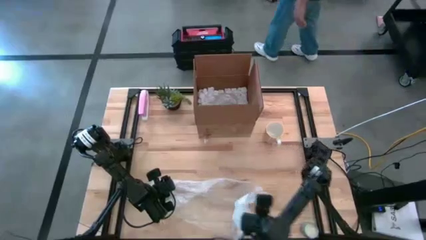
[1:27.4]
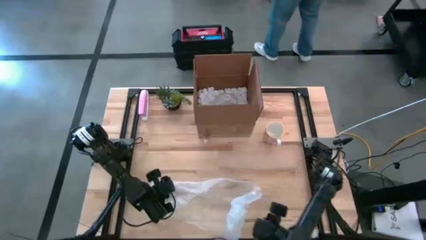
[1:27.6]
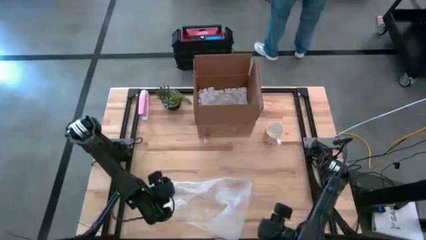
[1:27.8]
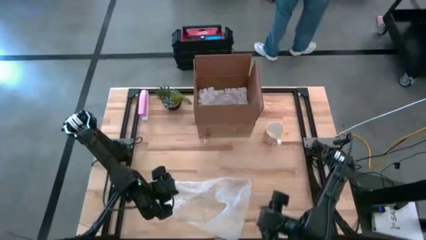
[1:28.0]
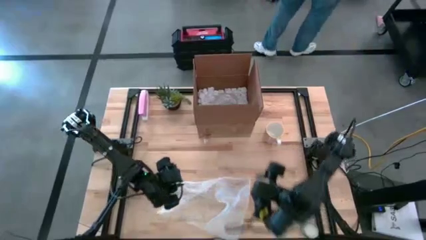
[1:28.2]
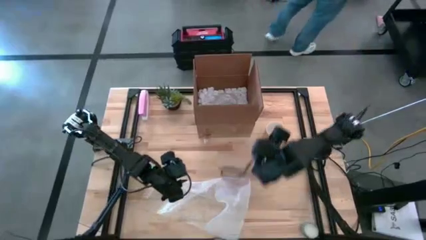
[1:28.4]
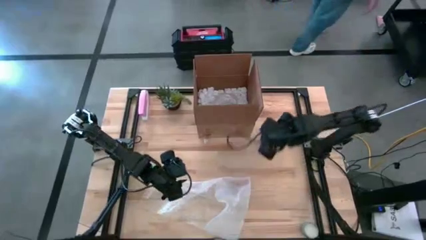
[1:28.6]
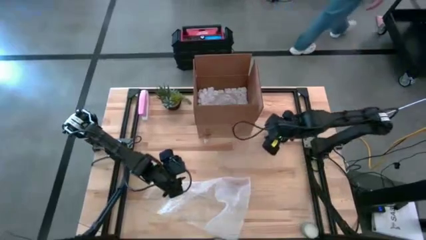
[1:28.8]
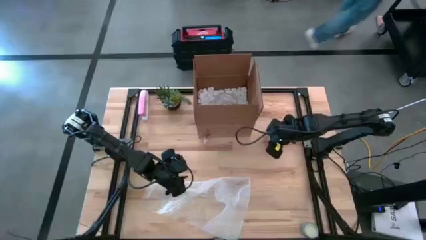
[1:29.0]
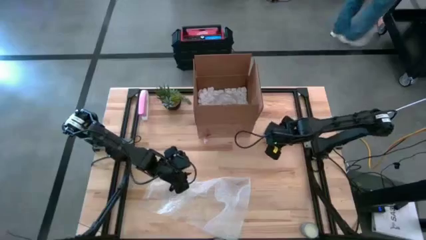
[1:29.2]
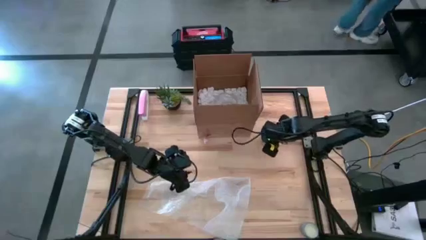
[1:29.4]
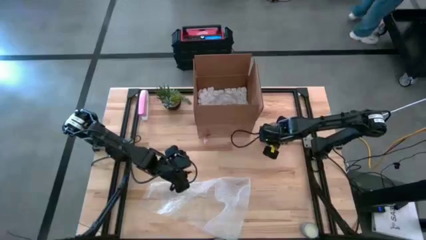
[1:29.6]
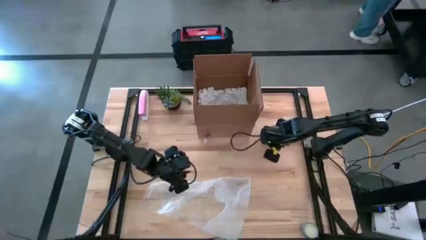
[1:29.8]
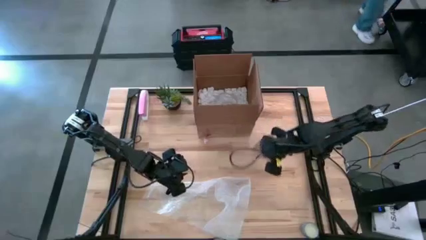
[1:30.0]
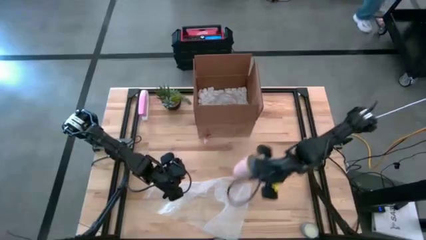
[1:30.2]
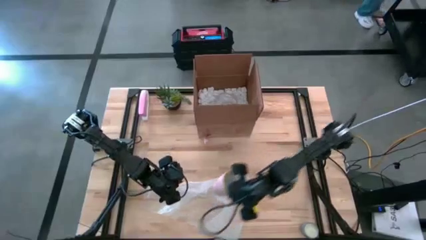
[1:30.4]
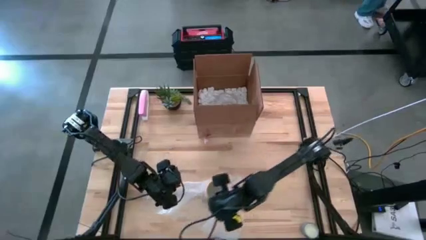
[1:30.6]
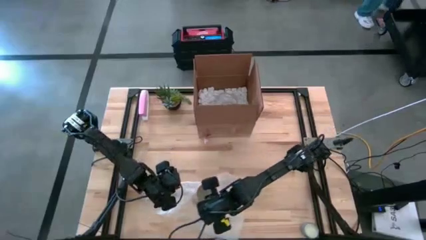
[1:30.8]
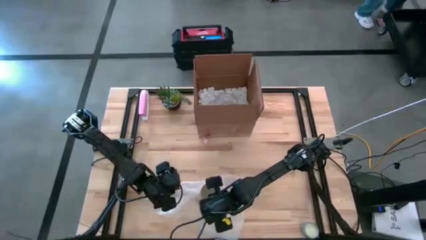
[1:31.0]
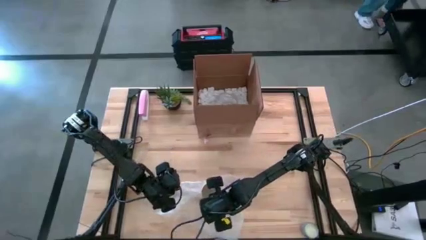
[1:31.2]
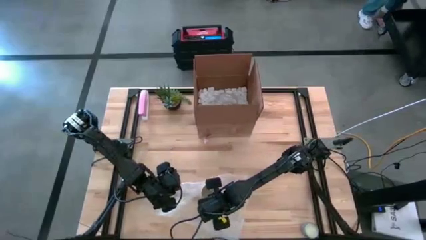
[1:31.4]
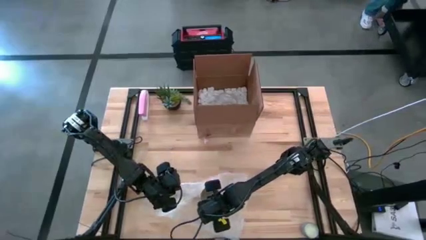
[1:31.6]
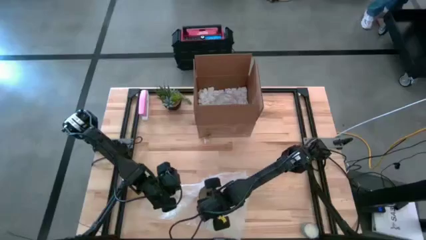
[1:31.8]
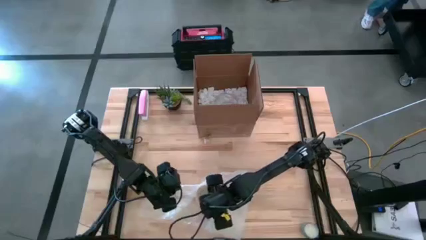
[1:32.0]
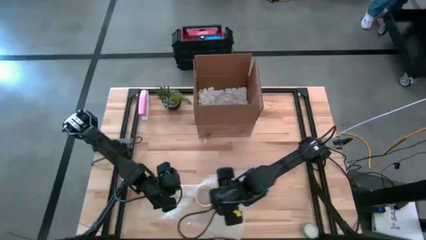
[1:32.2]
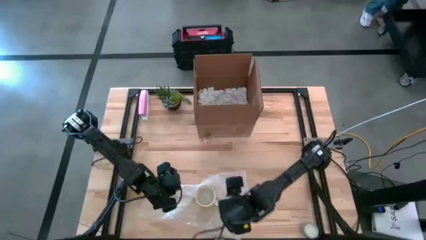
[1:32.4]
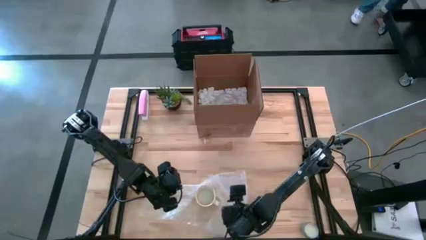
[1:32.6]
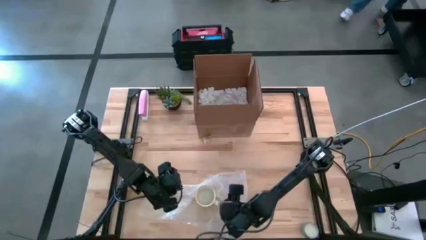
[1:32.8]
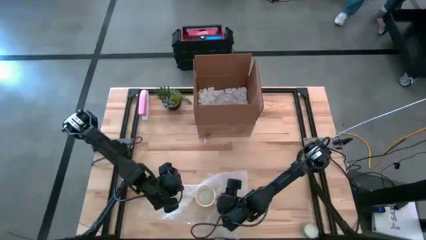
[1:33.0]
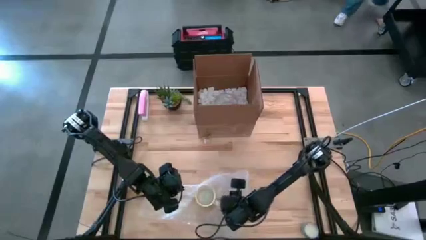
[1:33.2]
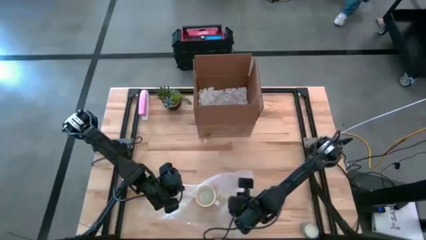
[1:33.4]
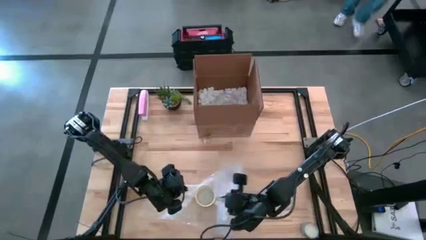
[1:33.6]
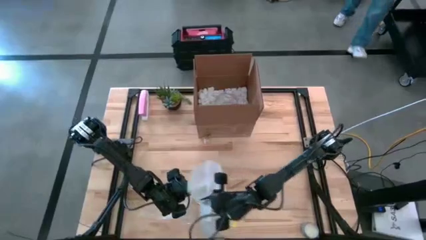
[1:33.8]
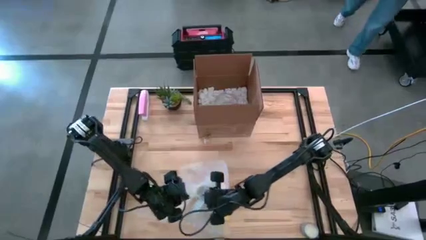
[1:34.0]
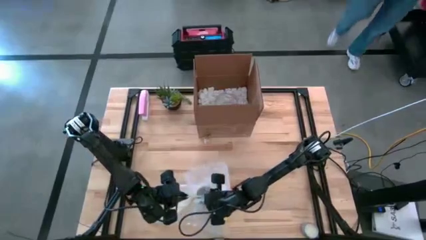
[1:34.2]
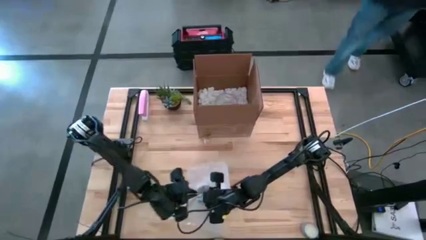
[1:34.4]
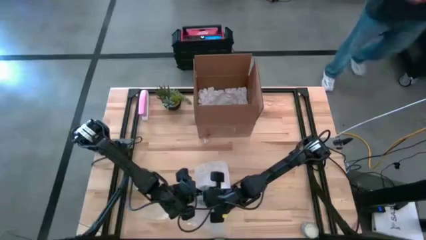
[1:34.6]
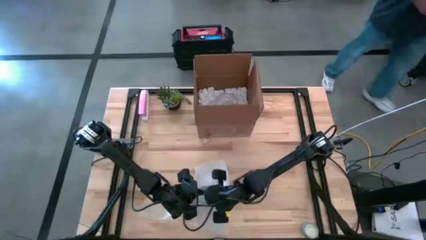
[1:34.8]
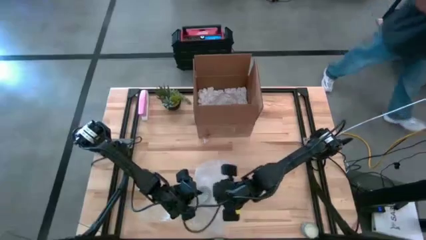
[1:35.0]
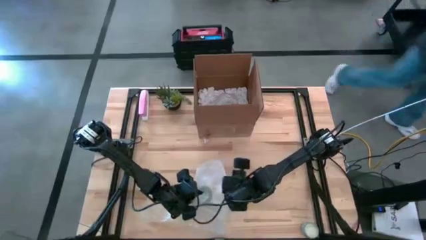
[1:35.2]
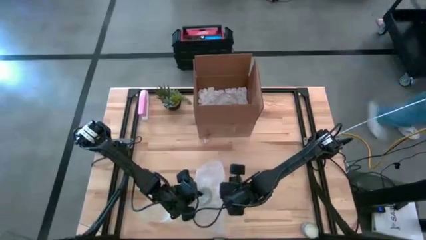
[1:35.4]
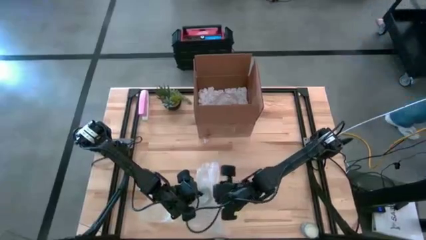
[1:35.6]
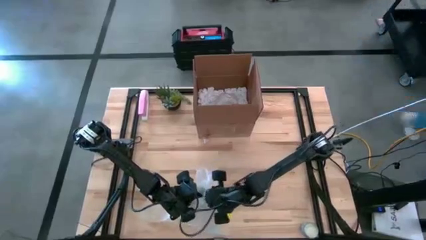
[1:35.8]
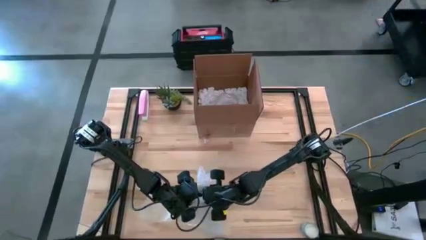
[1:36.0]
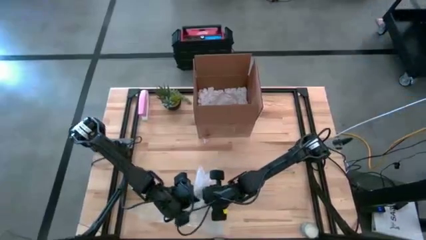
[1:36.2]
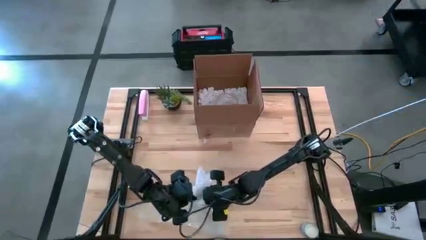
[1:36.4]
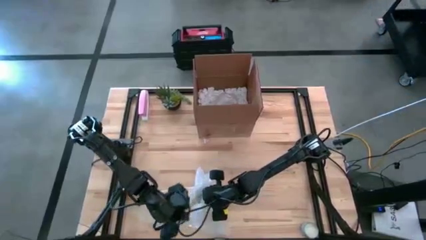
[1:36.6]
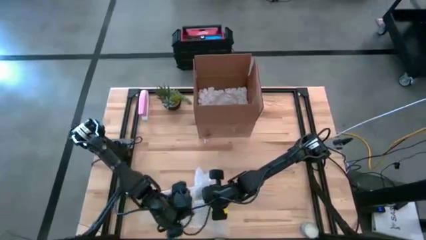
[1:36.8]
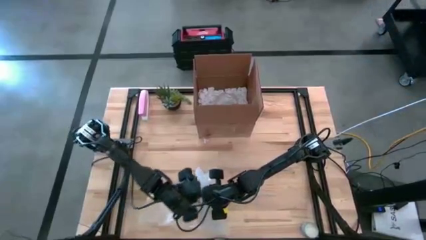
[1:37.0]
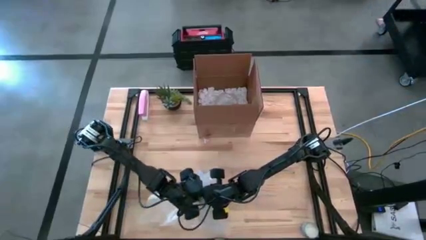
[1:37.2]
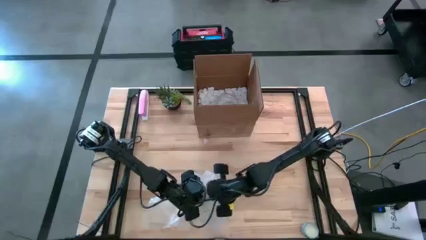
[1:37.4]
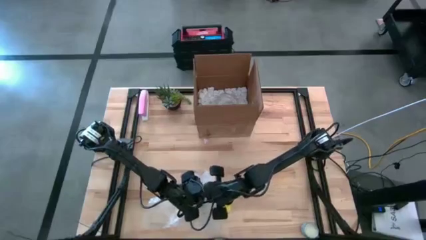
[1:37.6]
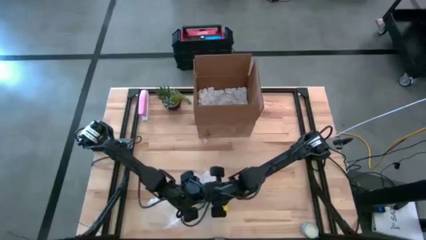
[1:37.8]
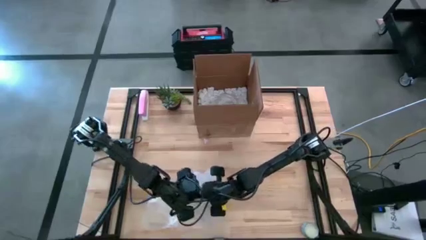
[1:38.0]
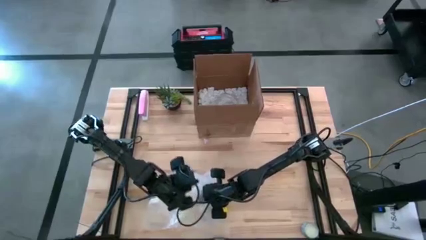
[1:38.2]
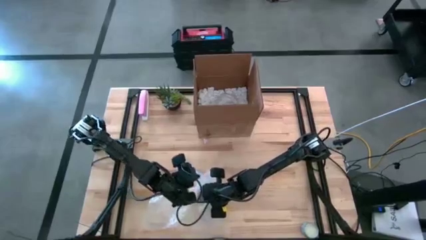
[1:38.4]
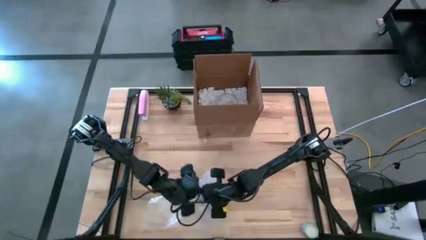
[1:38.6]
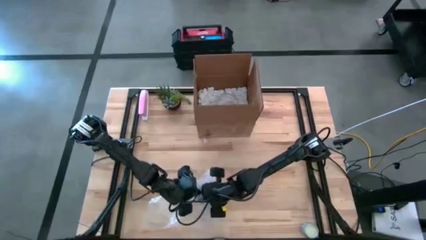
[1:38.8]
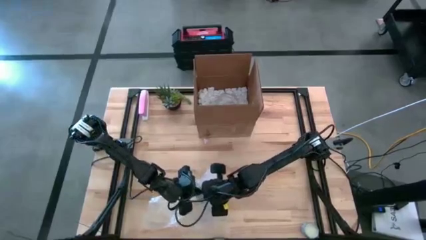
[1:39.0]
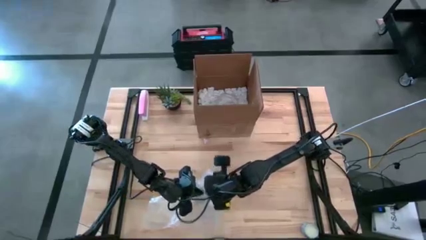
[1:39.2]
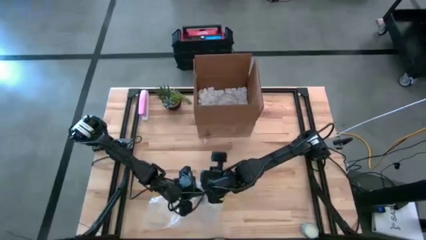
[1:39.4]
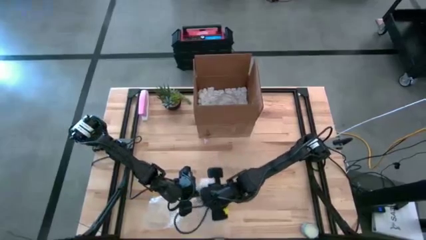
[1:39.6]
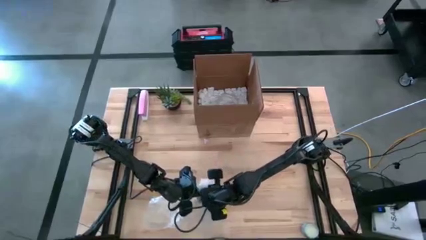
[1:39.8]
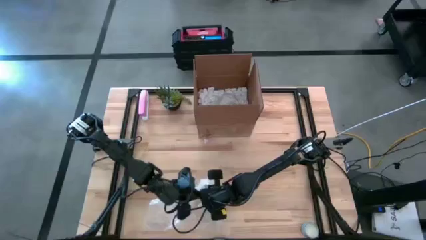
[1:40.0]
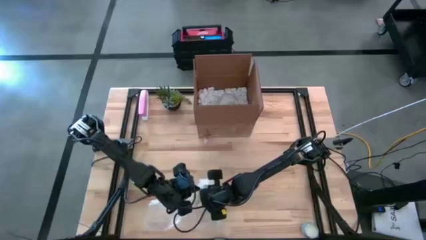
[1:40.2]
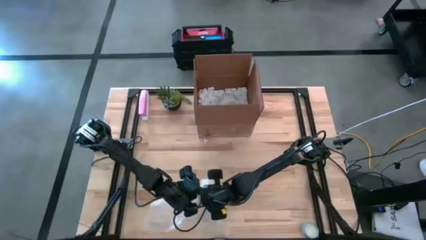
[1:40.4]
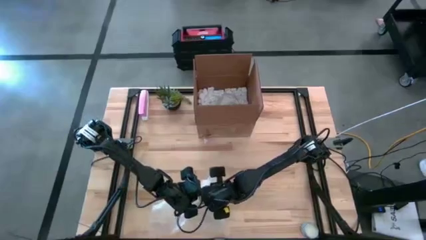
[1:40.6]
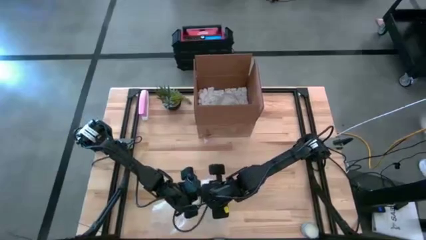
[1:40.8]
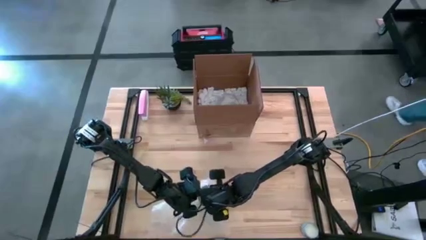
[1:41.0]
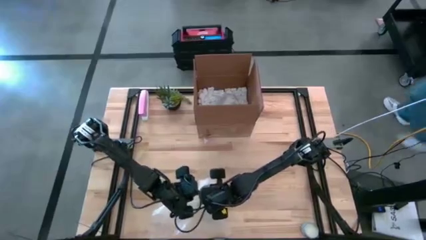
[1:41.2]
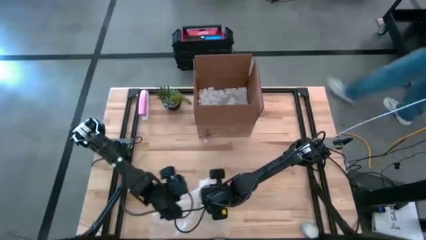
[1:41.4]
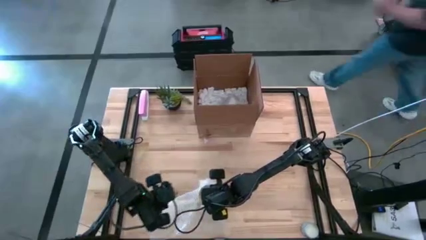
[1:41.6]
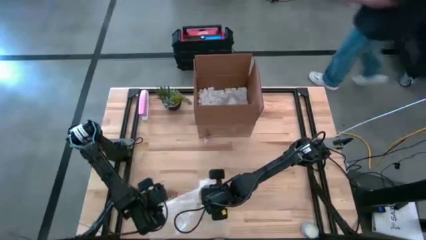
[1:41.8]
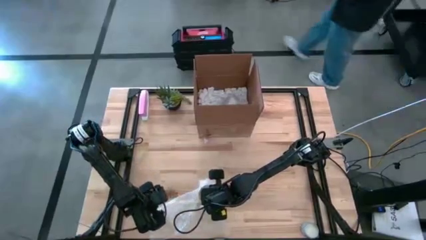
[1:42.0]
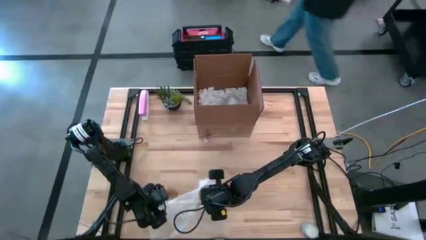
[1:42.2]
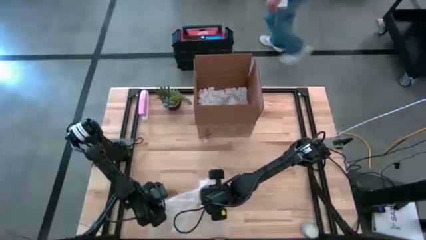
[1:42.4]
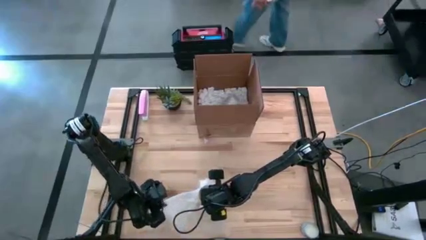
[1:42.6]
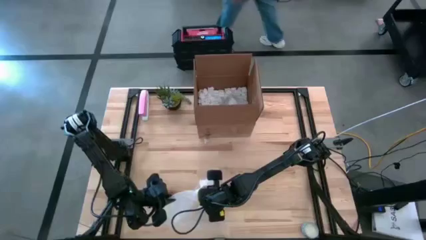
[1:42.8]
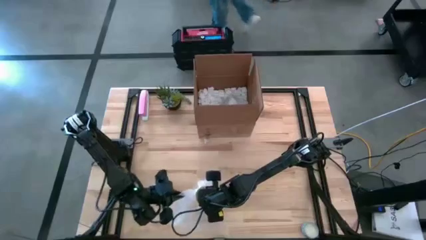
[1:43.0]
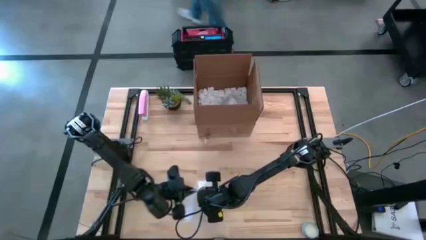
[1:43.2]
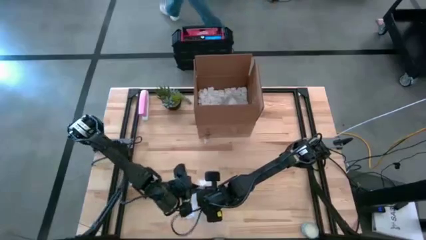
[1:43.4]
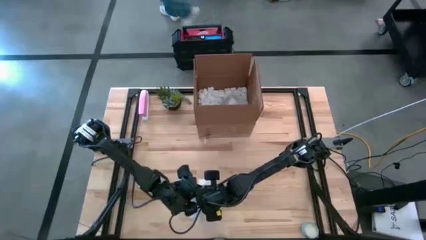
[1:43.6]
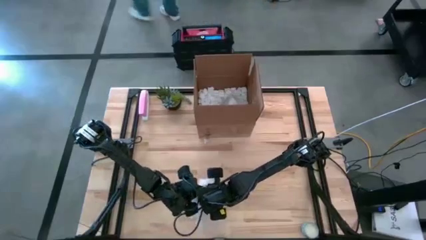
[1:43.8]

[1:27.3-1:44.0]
Task: wrap mug
Wrap the yellow mug with a bubble wrap
